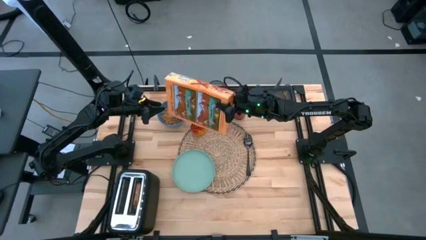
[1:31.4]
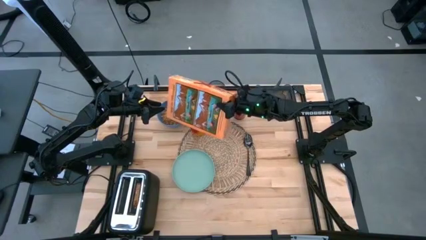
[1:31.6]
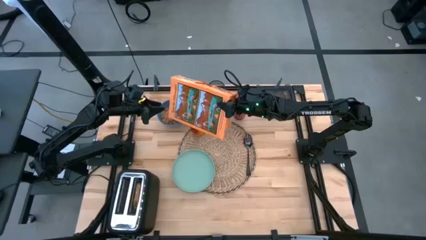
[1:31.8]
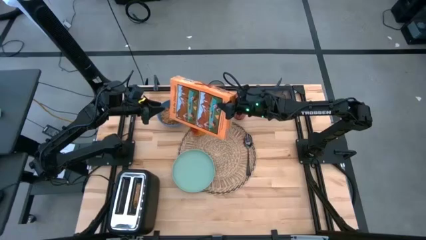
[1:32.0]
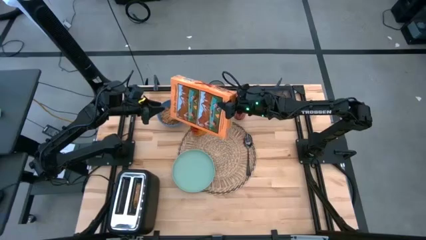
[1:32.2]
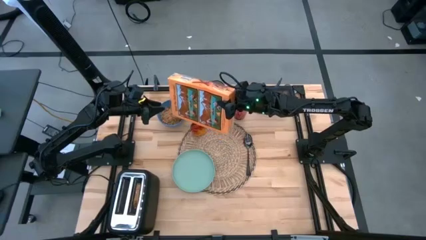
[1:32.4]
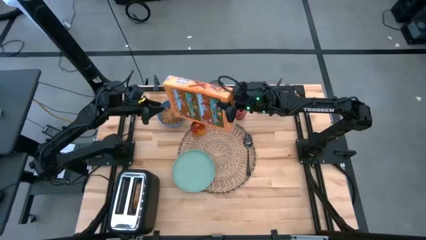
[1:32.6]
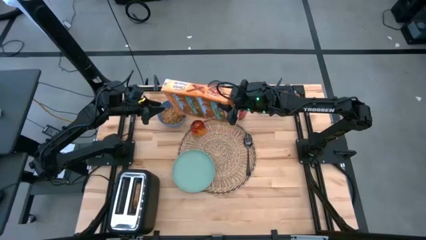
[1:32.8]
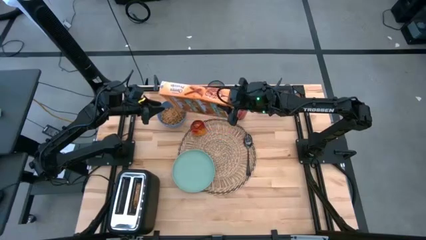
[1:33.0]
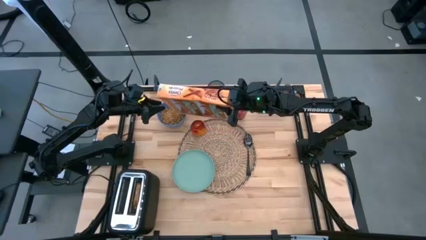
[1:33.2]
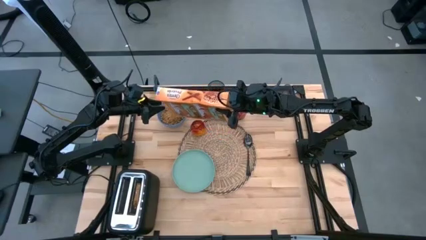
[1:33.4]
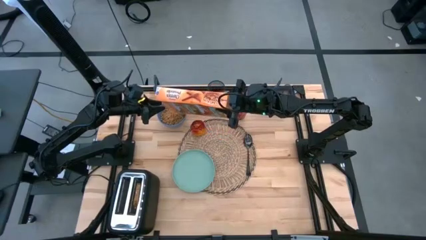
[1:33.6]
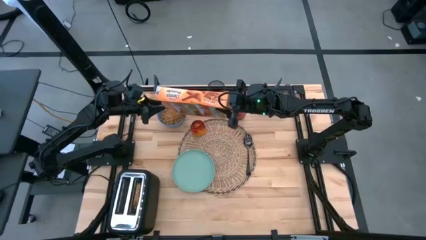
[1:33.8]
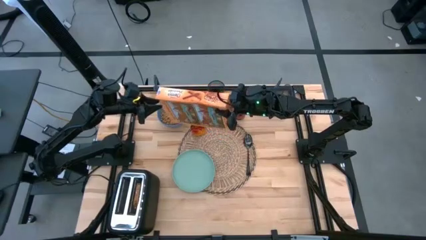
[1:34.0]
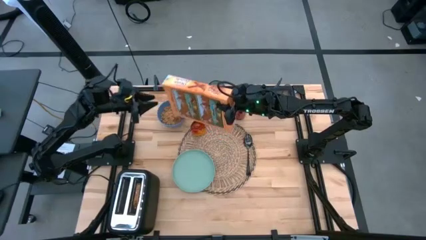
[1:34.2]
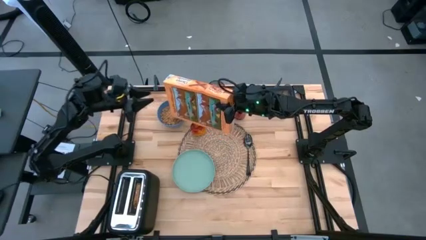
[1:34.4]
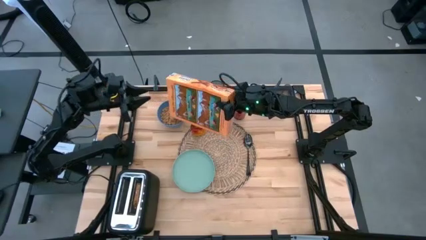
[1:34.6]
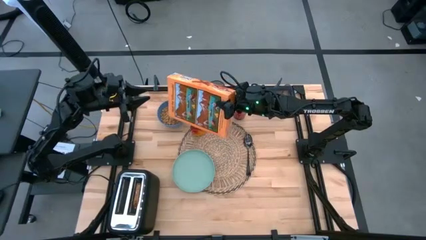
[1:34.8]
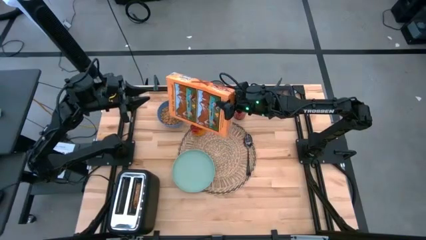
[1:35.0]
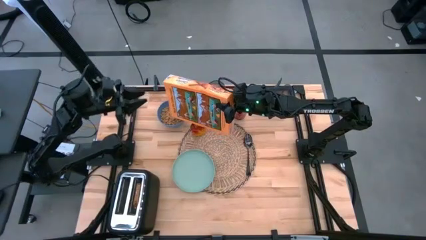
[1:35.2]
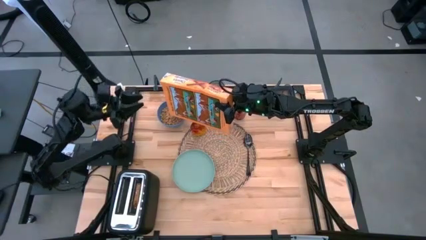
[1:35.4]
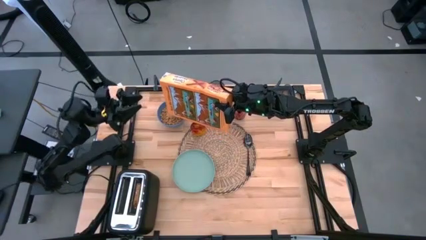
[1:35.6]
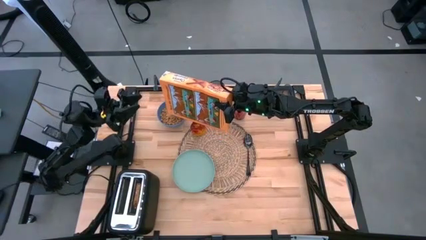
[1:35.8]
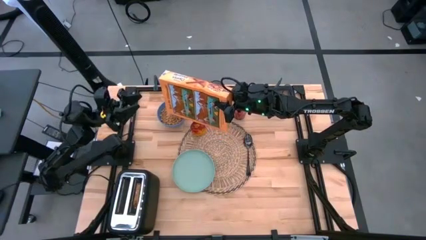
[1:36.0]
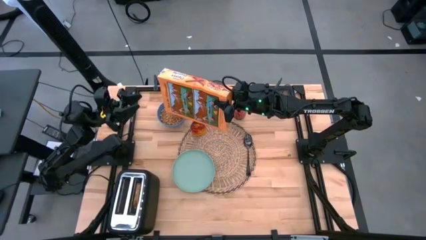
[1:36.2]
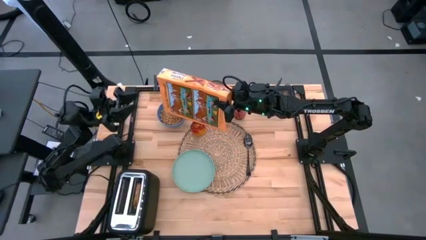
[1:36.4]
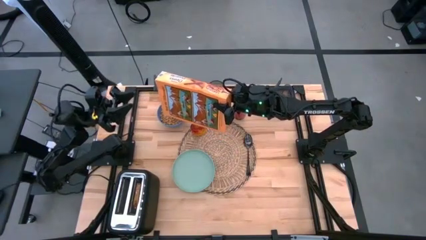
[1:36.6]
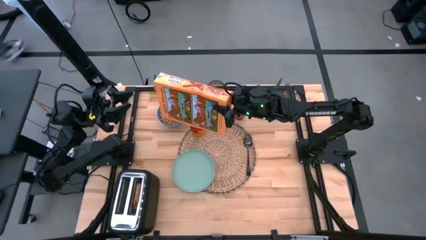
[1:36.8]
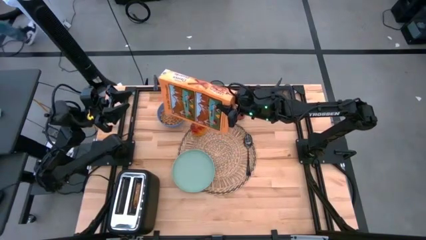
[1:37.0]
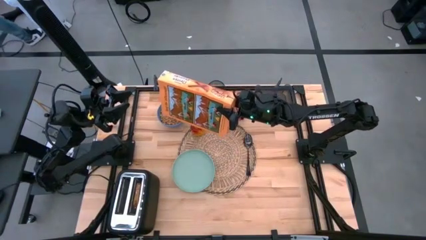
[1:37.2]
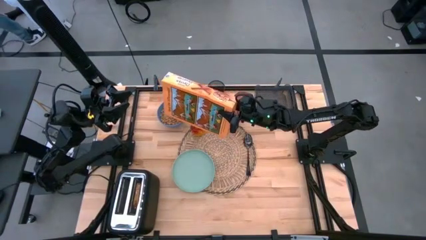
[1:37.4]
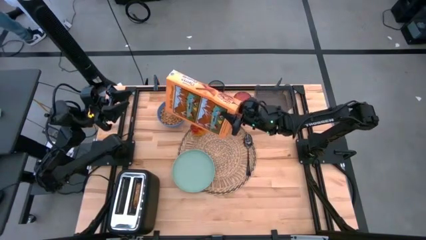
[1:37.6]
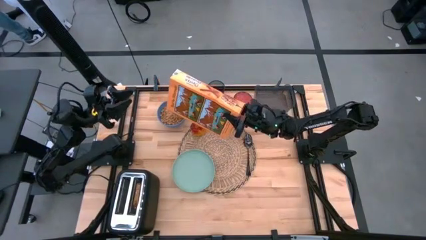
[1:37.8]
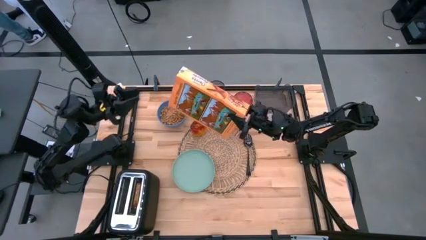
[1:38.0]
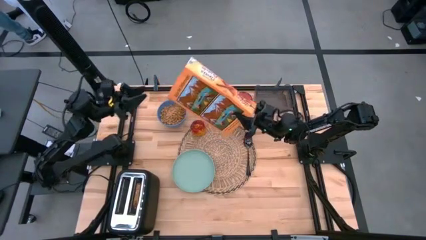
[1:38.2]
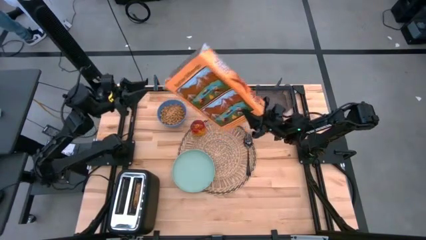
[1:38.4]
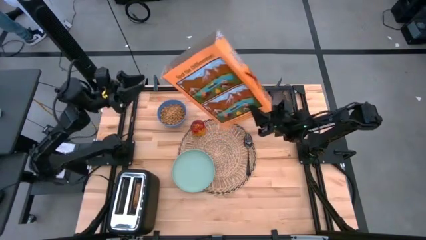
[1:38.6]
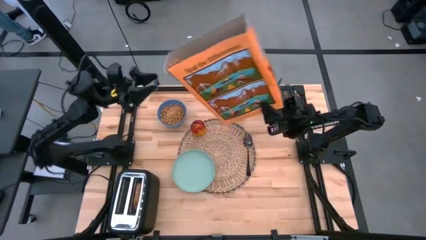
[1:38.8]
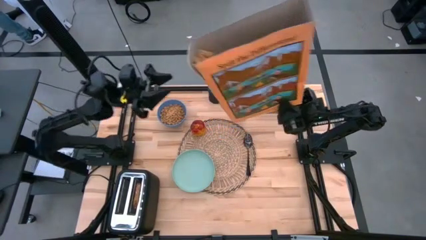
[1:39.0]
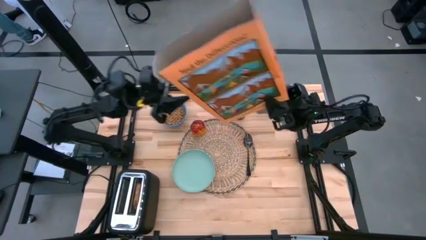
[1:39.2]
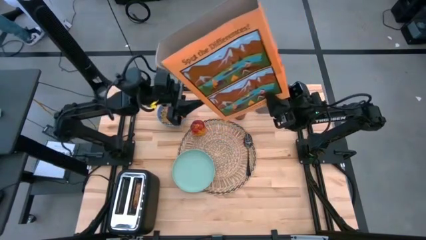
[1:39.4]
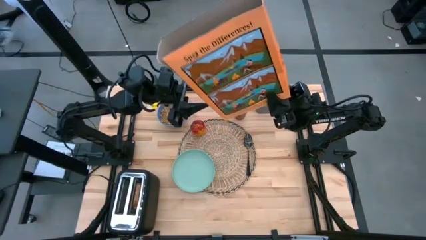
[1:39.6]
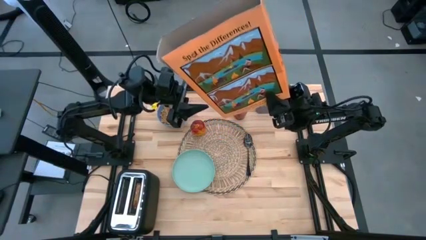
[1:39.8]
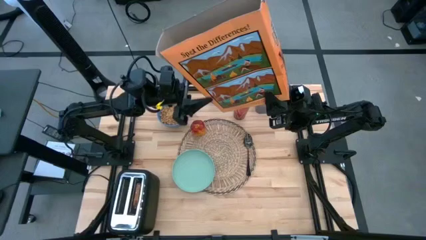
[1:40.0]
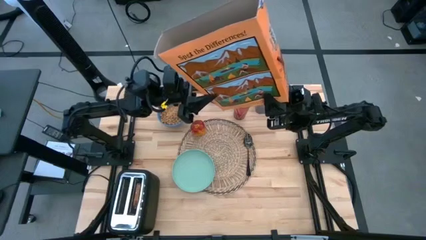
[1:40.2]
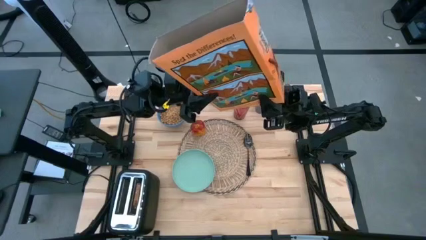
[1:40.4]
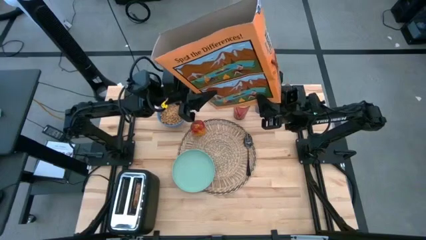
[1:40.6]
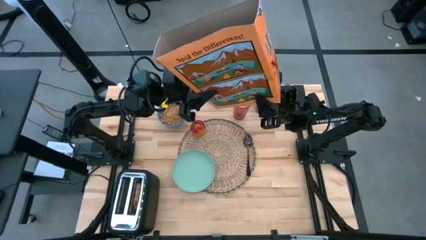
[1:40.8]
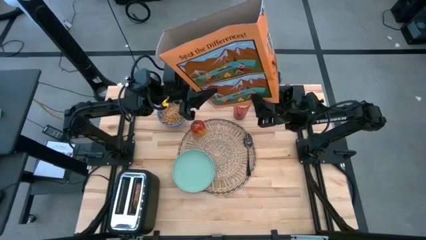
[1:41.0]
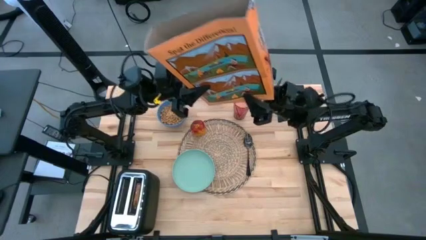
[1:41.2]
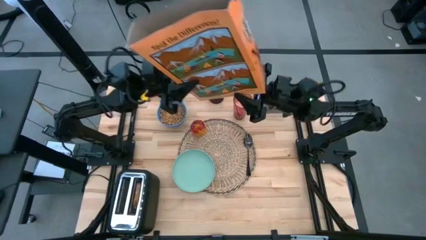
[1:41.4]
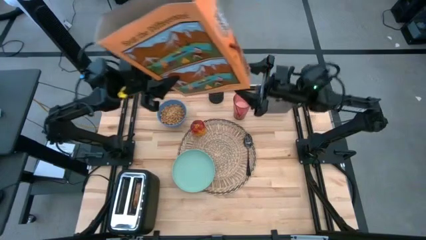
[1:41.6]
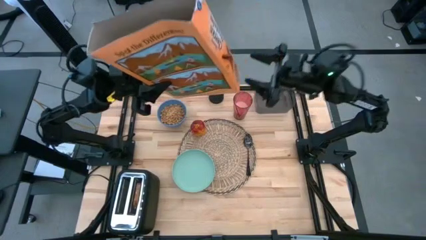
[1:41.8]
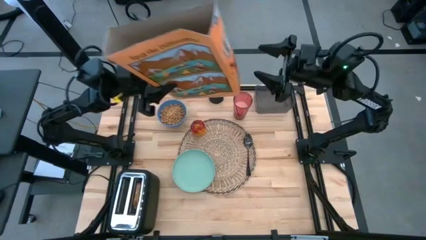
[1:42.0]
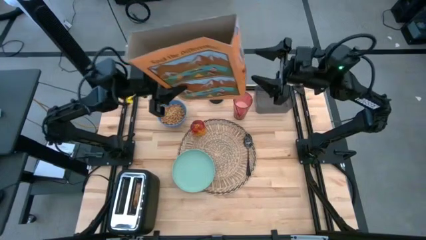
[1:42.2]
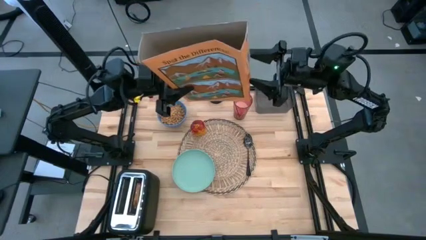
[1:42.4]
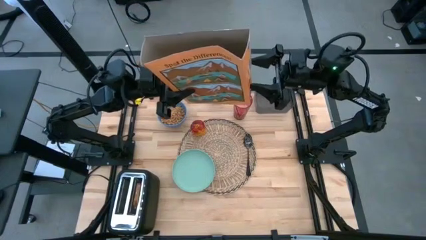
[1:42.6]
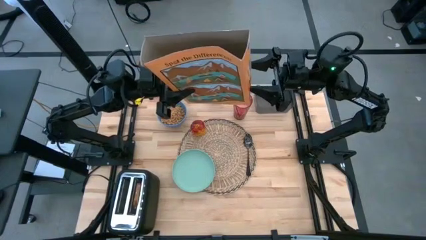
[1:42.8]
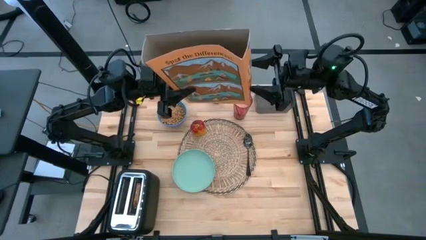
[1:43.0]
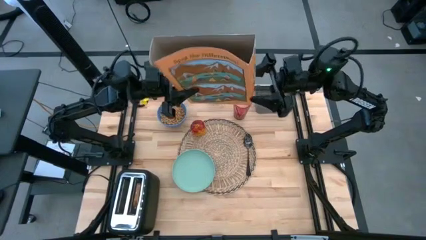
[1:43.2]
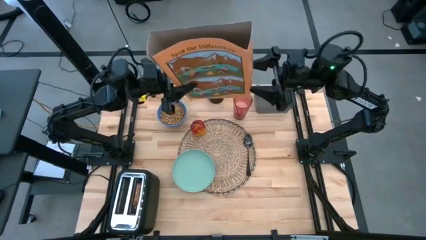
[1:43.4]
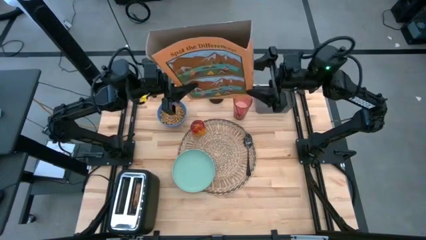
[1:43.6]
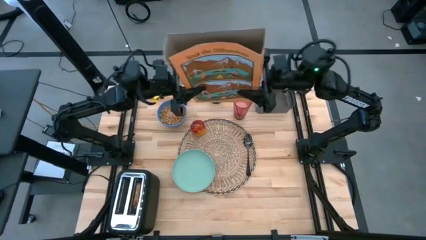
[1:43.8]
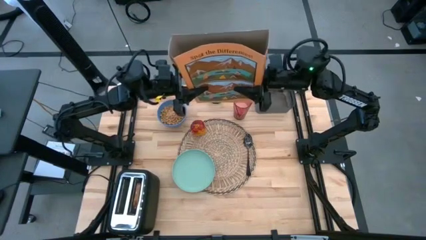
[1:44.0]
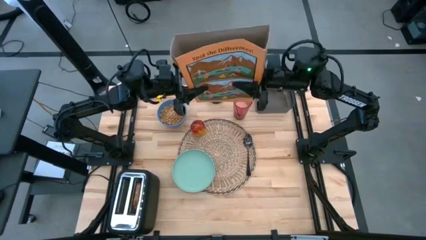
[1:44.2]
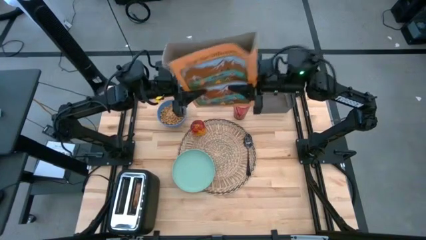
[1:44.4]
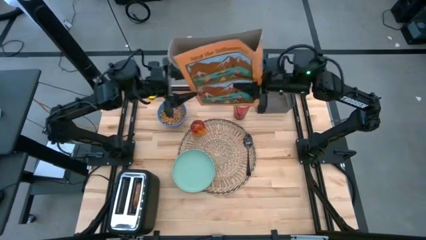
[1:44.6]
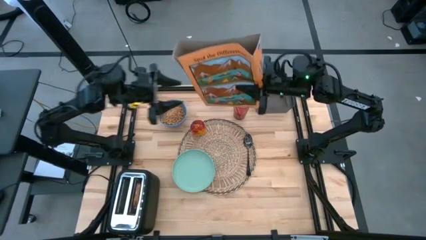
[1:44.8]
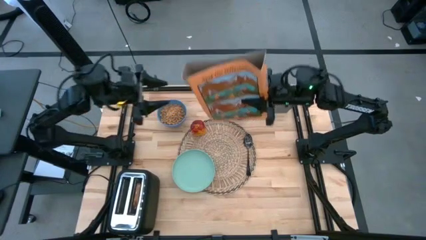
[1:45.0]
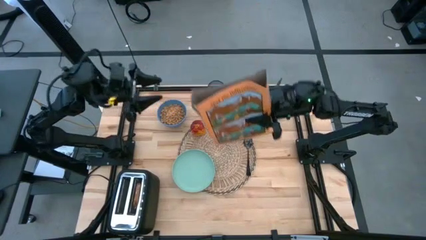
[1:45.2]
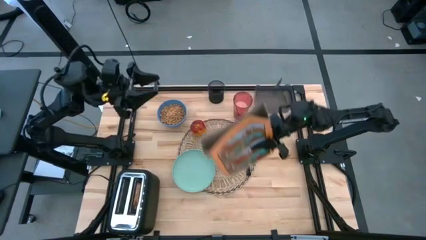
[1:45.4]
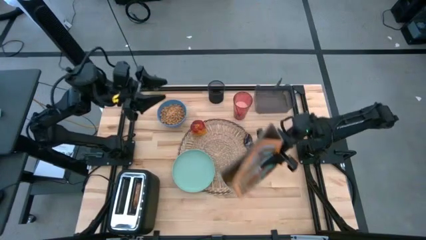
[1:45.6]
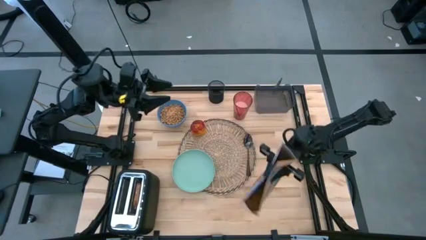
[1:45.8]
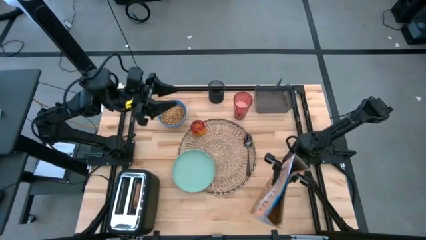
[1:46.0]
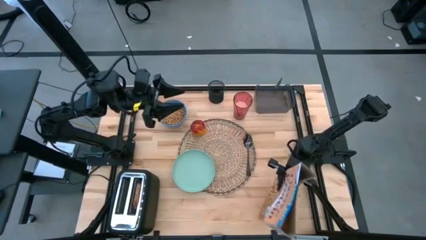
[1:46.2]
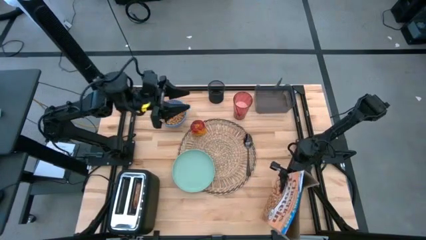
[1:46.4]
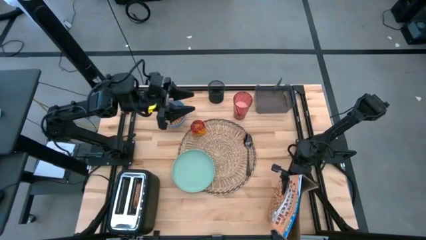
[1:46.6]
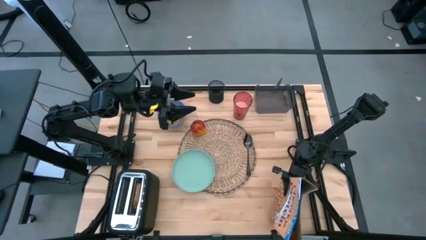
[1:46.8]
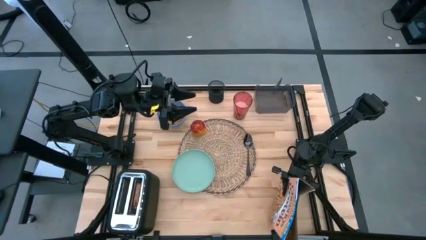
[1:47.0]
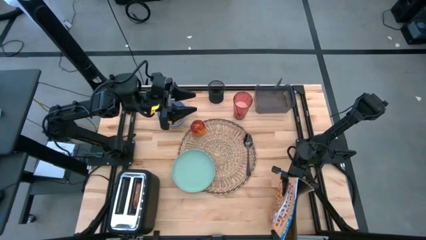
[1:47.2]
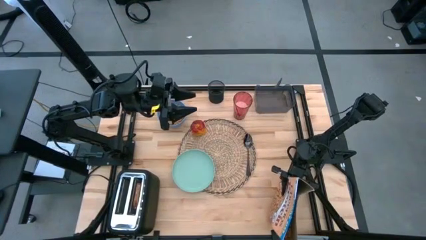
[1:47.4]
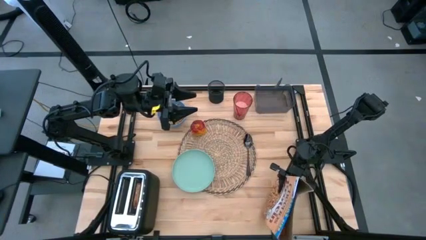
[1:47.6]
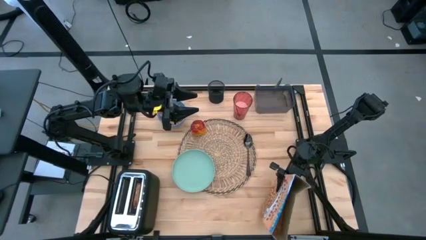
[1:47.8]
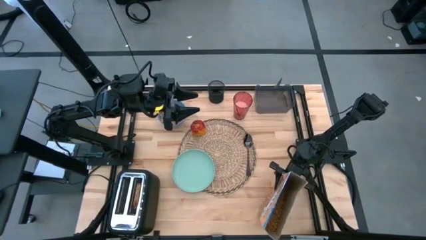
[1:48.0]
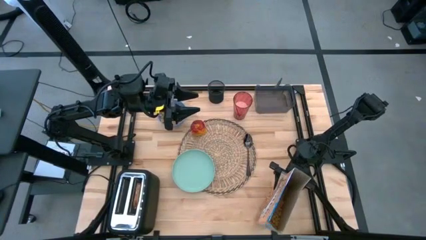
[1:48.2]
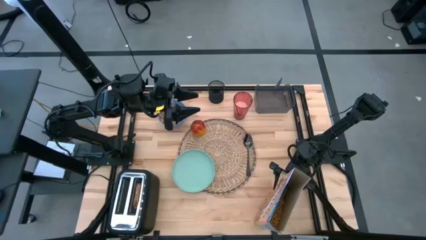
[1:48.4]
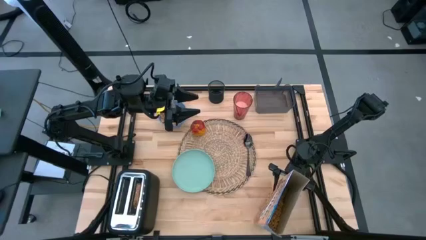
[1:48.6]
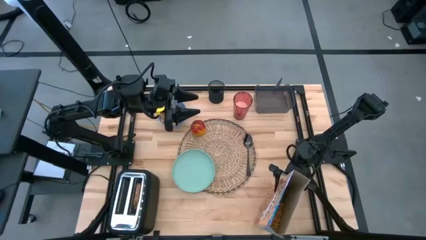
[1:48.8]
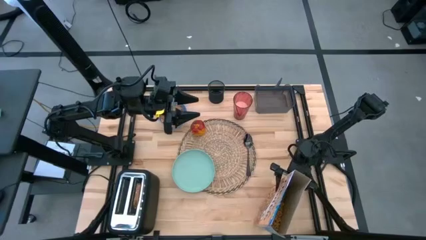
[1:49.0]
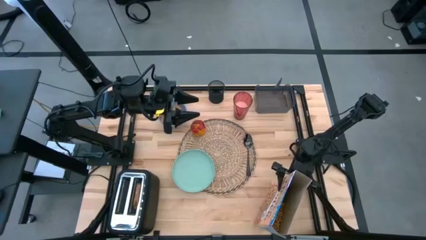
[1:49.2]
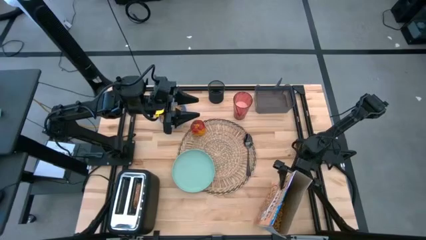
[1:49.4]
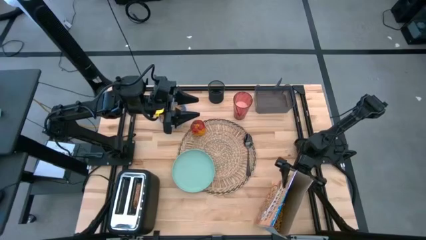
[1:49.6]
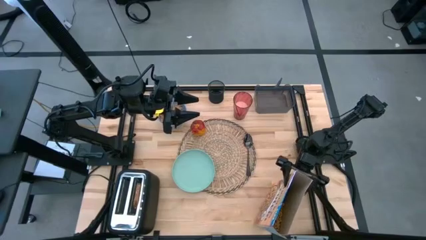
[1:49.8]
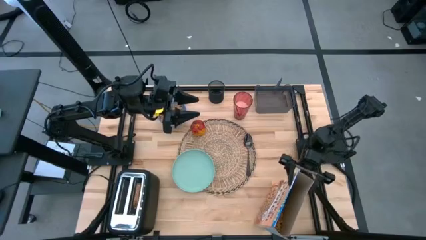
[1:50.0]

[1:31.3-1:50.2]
Task: Arrange a breakfast setting
Pour the cereal from the orange cereal box into the blue bowl
